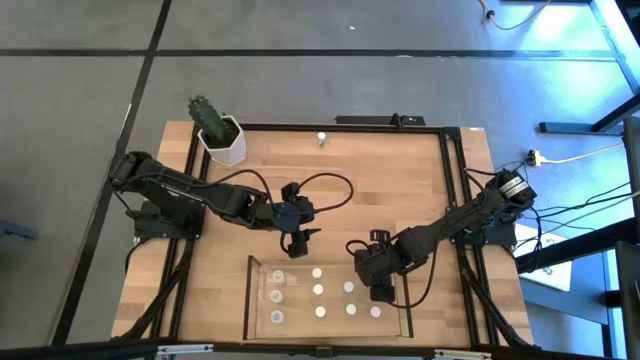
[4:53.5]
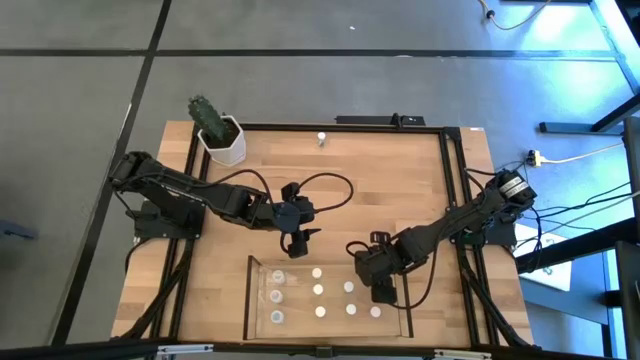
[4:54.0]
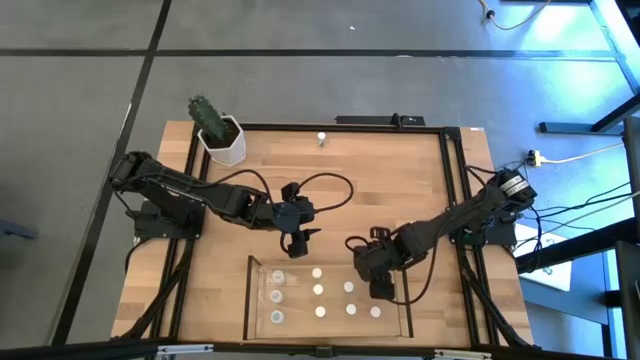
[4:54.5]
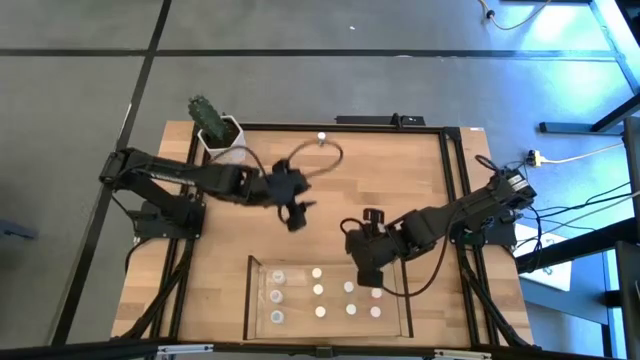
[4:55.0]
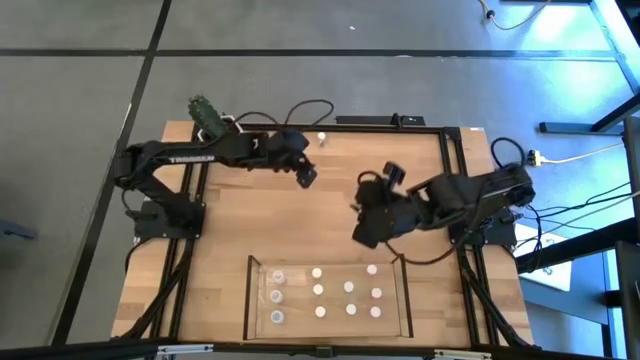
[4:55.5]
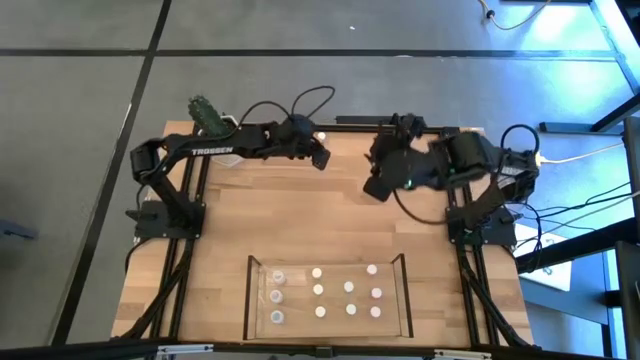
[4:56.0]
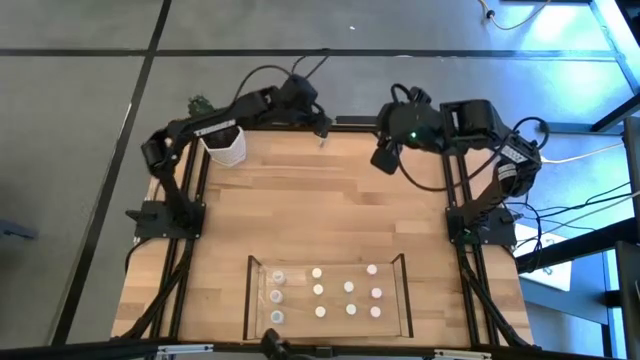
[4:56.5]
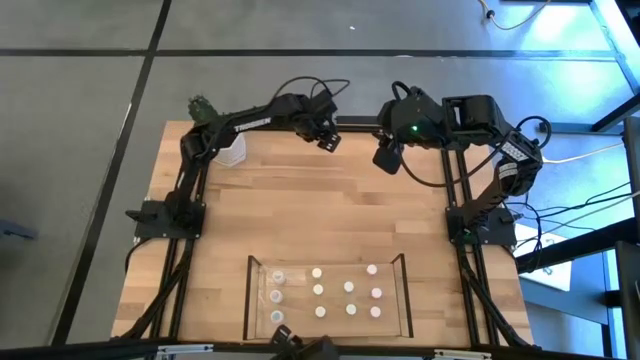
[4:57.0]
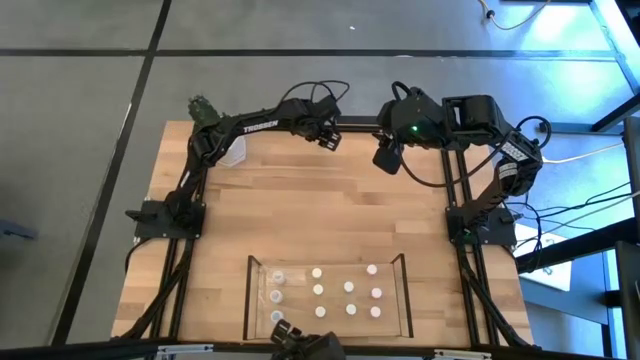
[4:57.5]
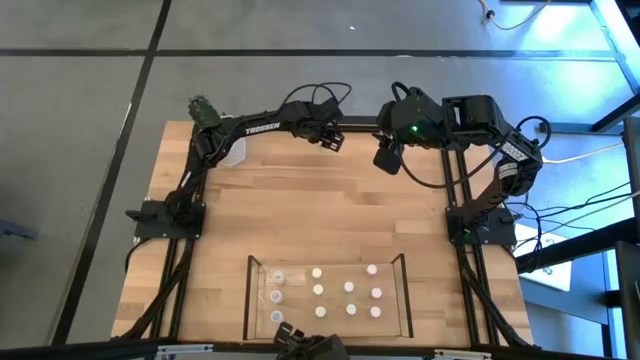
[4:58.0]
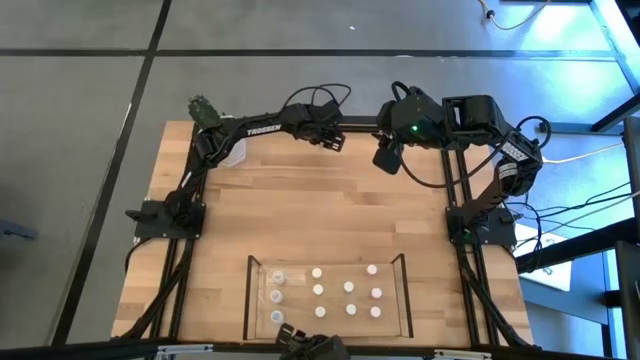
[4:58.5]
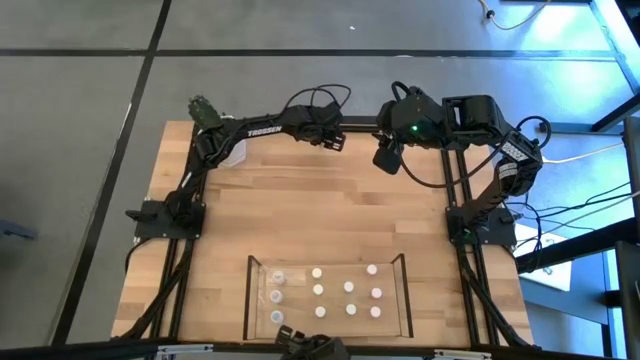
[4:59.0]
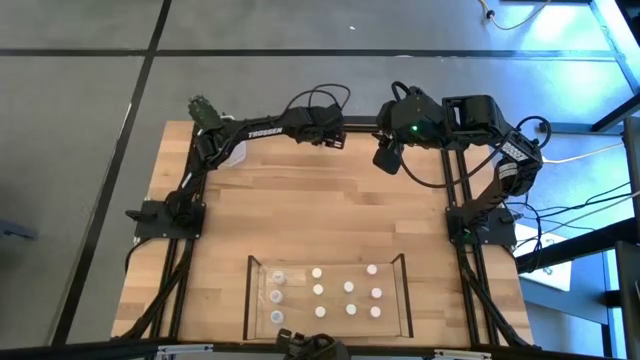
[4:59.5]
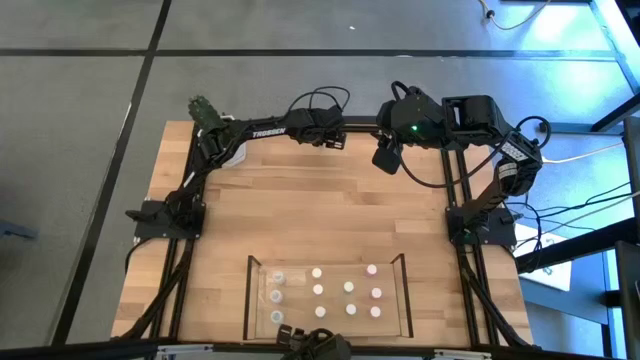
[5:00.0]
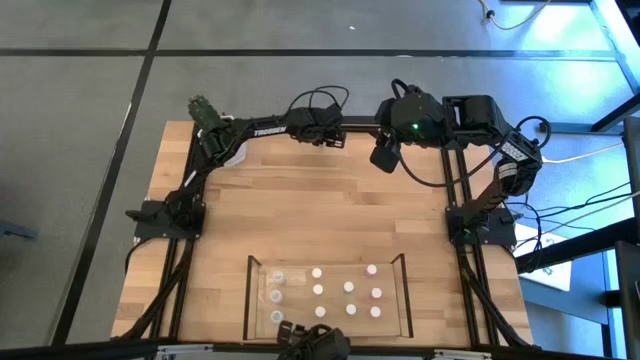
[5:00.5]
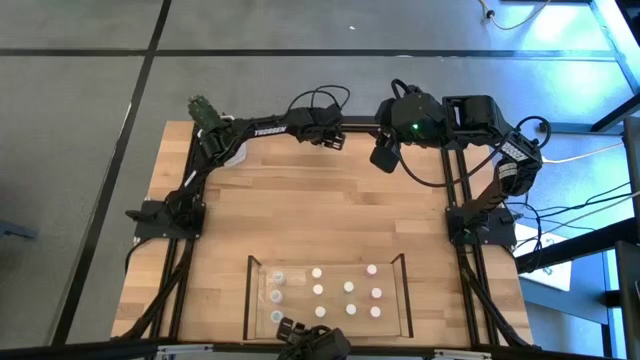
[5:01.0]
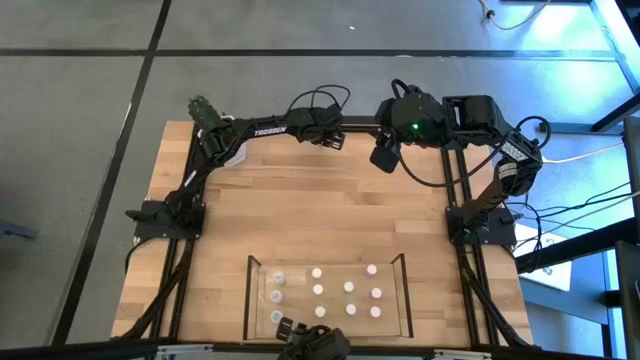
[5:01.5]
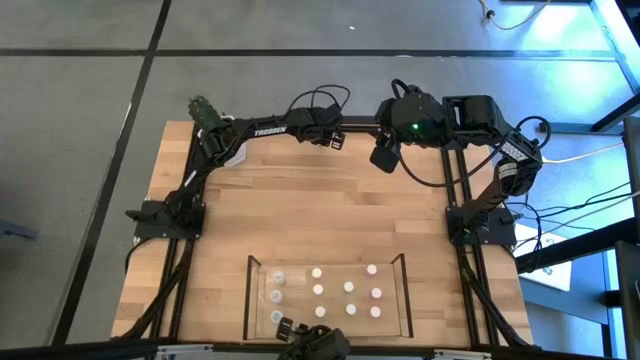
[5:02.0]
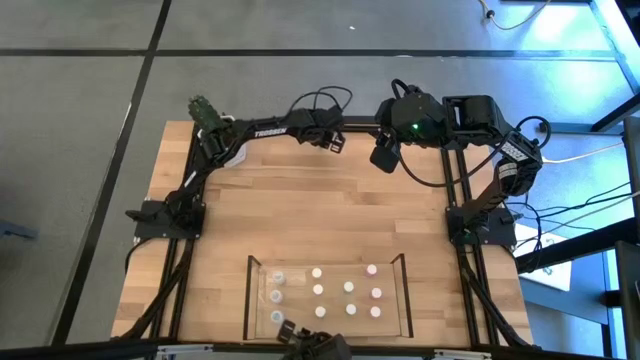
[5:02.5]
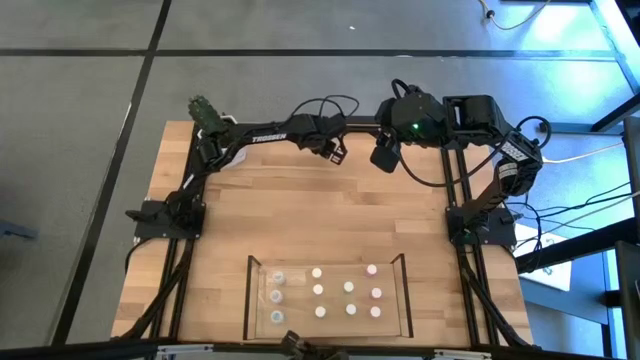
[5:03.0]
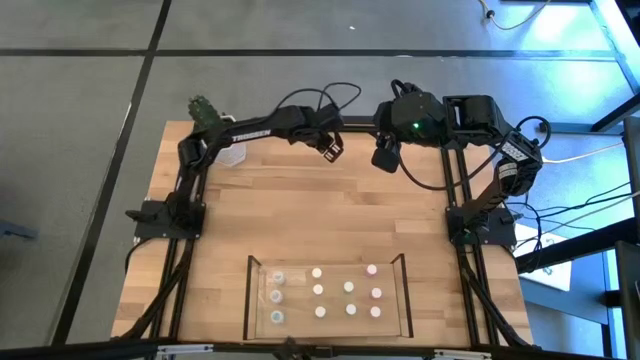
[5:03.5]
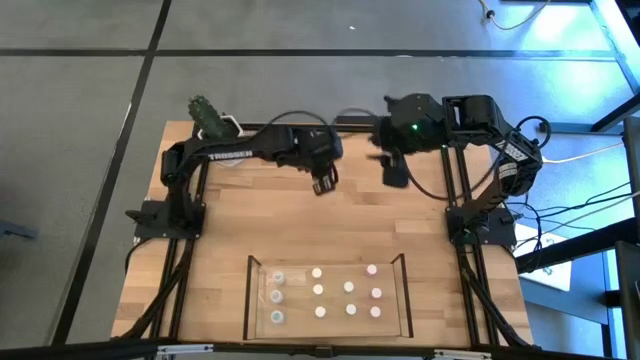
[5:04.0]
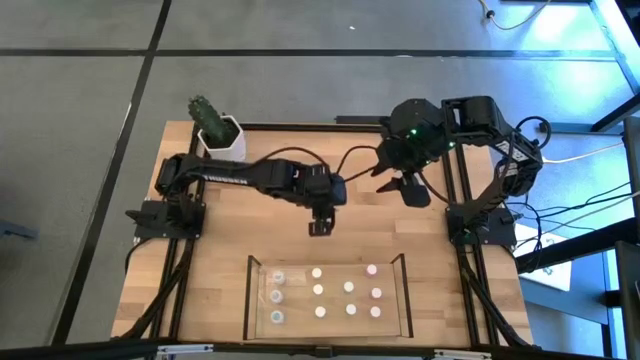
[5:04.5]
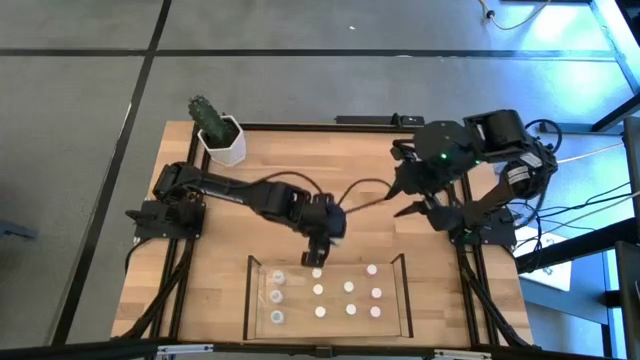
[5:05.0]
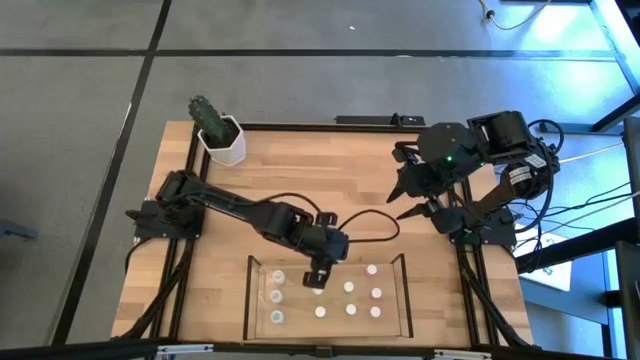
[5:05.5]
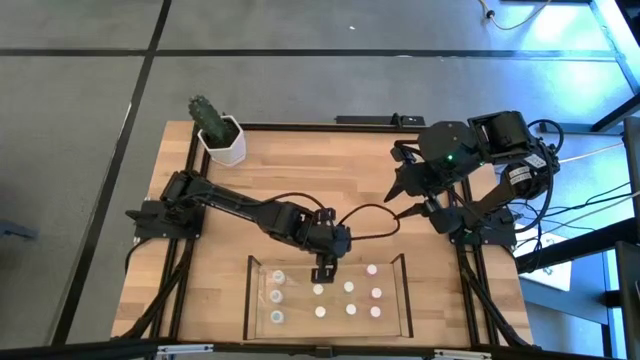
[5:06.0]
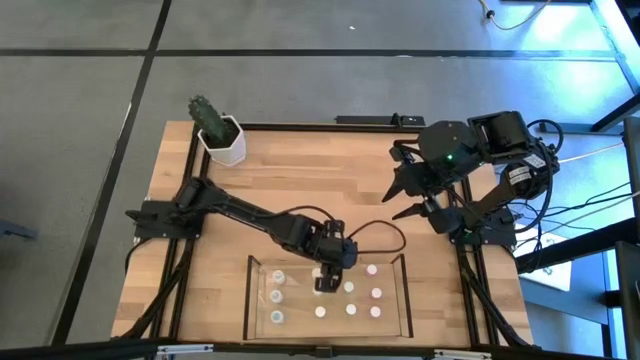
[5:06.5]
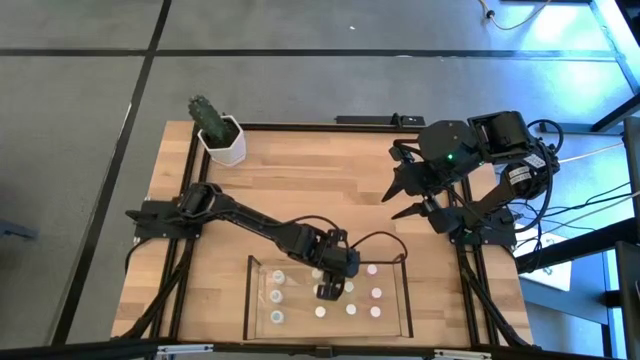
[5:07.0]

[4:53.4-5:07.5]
Task: Pick and place medicine bottles onto shelf by color
Put the blue pill bottle on the shelf aligned with the other blue pill bottle

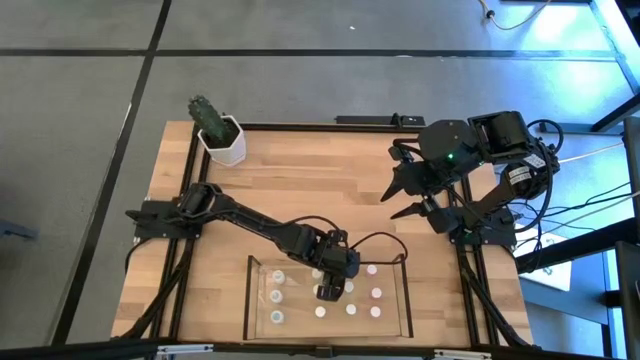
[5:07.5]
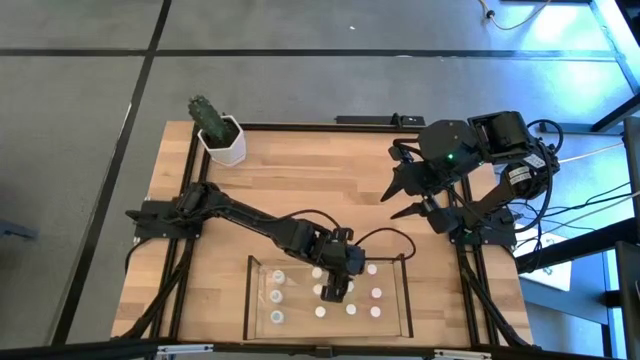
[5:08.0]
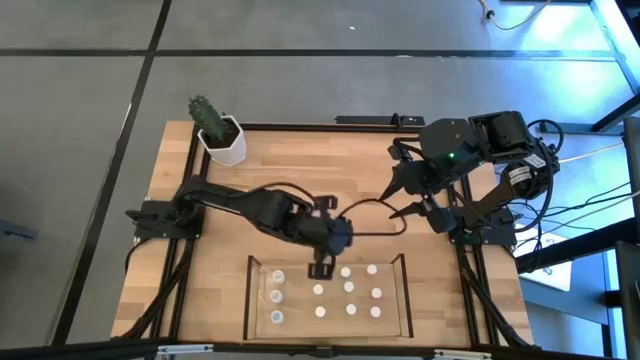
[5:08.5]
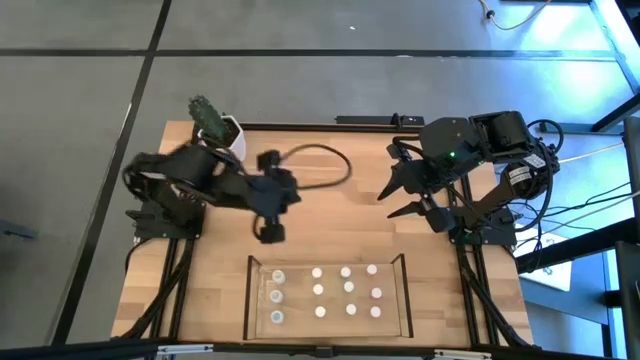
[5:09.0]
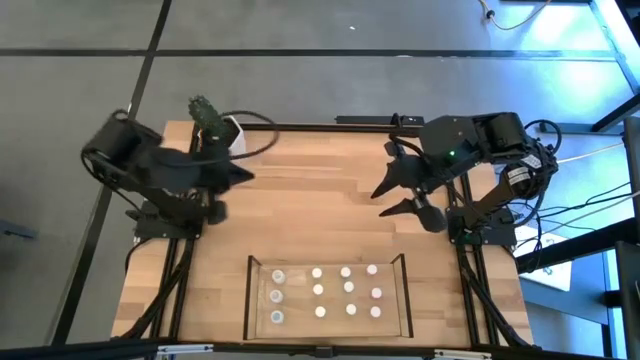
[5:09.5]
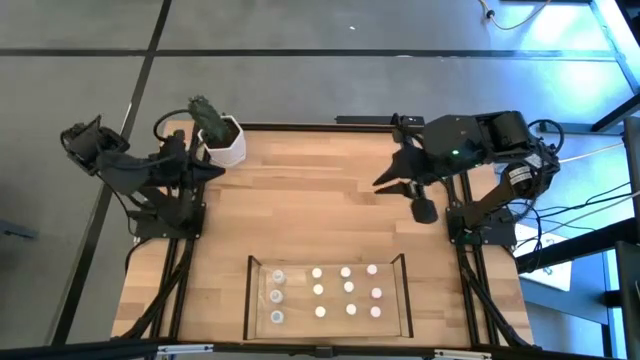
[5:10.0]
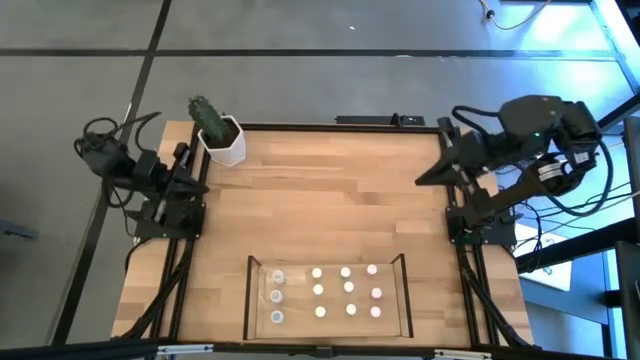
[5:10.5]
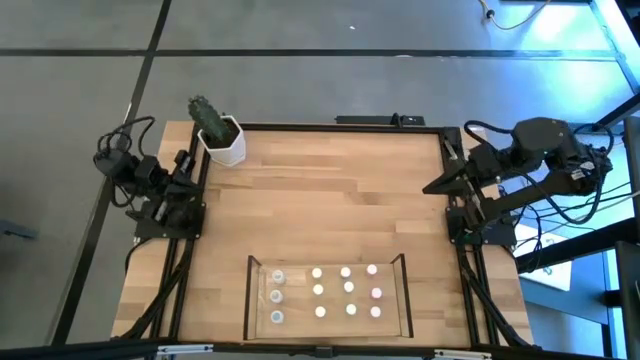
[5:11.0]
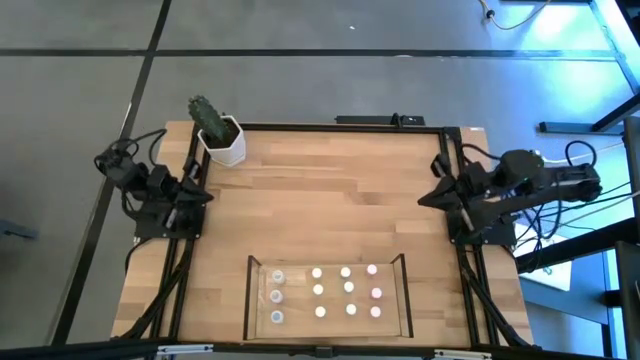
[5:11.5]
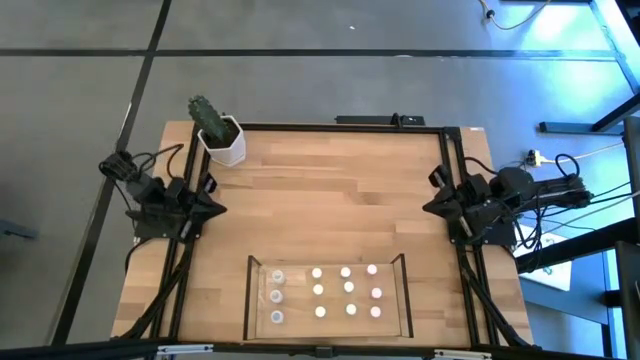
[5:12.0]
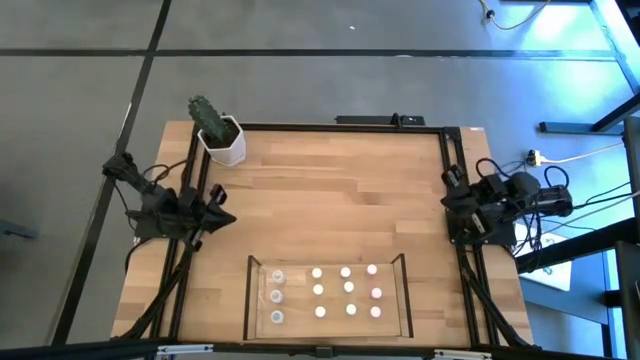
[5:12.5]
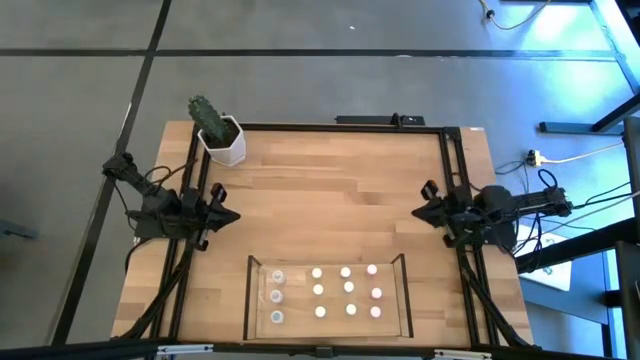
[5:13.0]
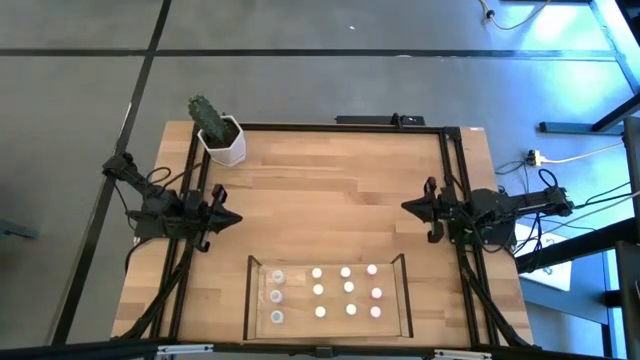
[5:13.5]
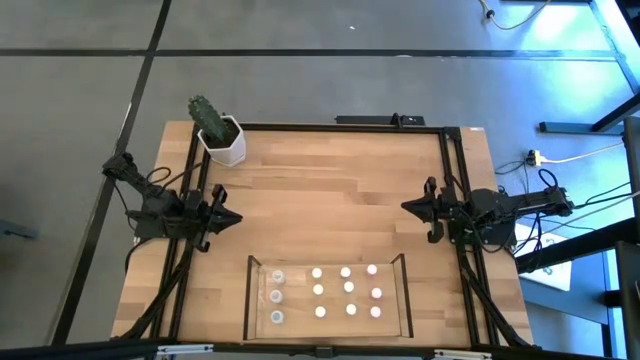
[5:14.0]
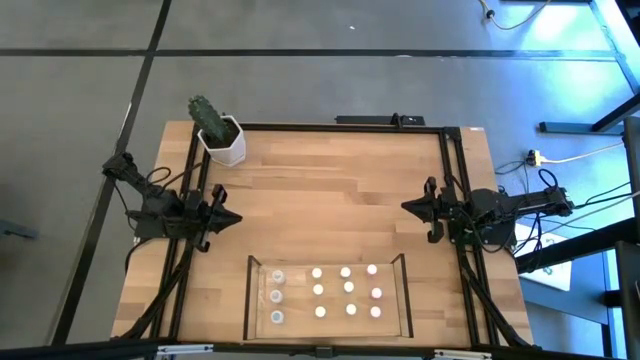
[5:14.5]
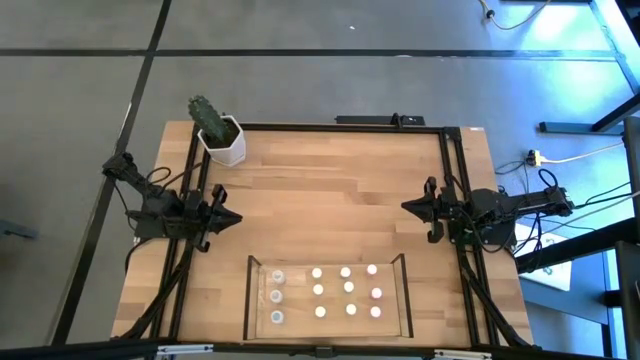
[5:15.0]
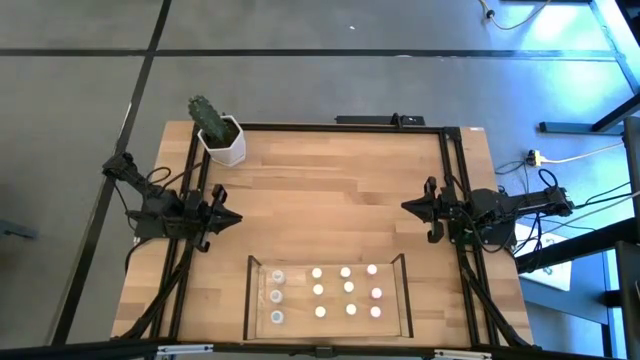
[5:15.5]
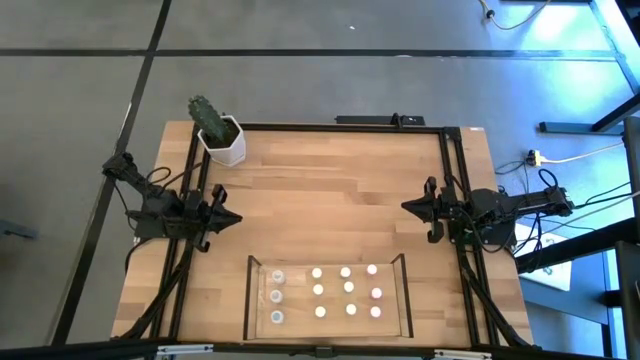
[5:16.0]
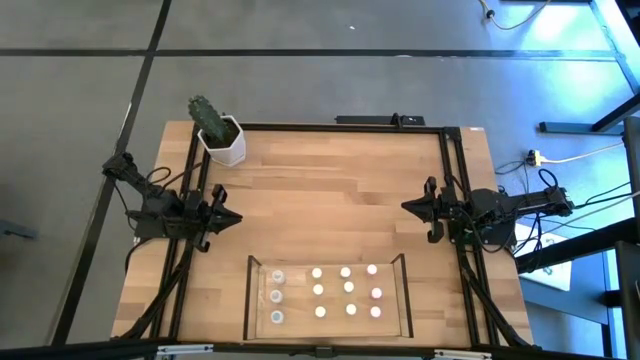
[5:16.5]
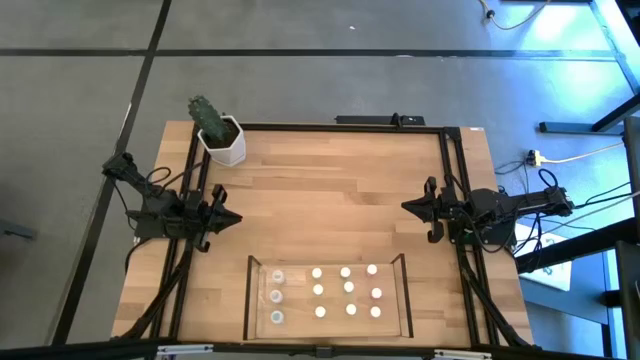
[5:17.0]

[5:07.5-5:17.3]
Return to Home Position
